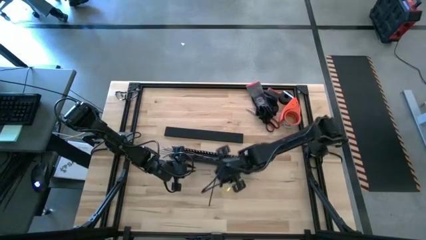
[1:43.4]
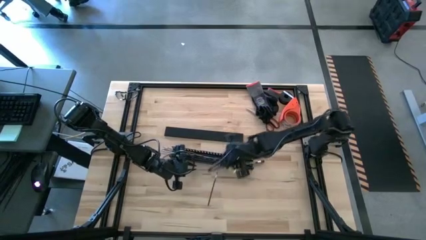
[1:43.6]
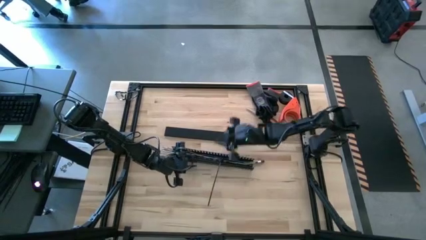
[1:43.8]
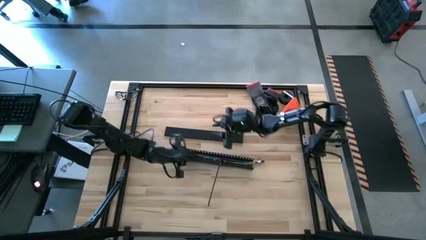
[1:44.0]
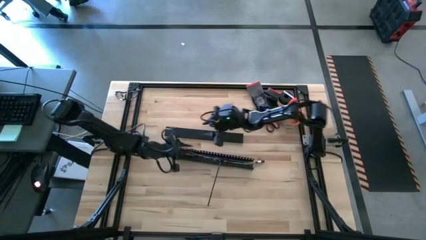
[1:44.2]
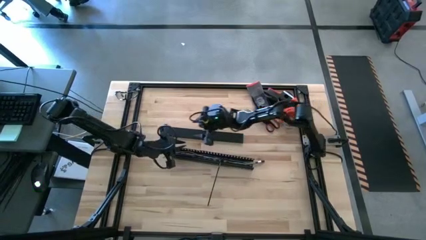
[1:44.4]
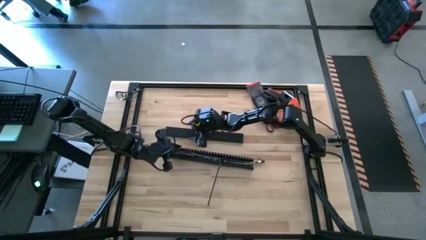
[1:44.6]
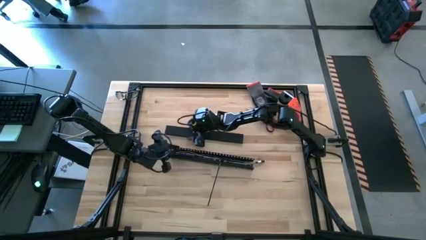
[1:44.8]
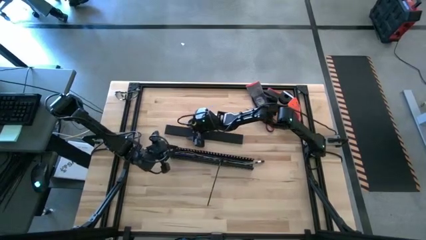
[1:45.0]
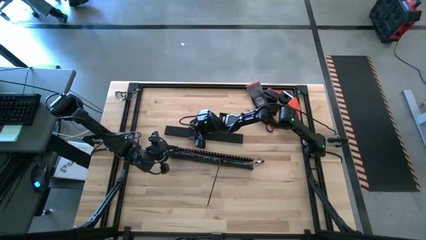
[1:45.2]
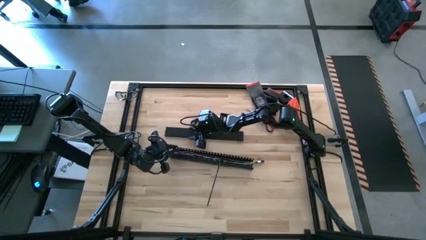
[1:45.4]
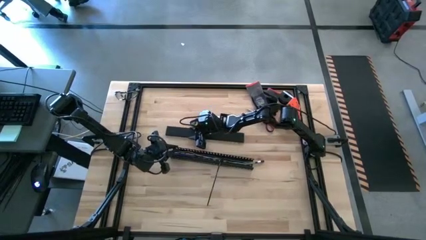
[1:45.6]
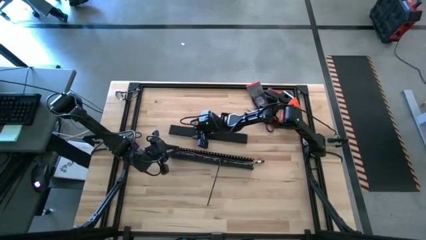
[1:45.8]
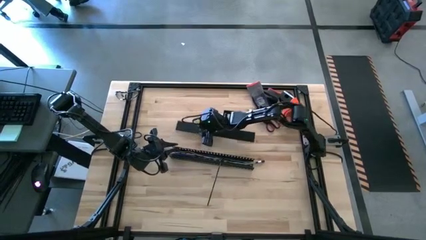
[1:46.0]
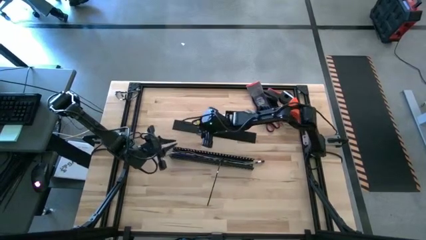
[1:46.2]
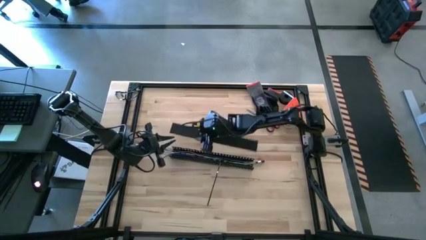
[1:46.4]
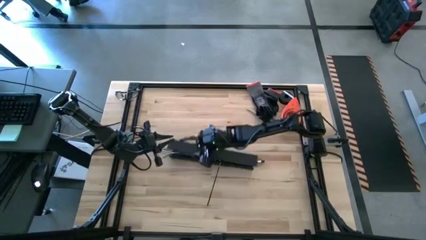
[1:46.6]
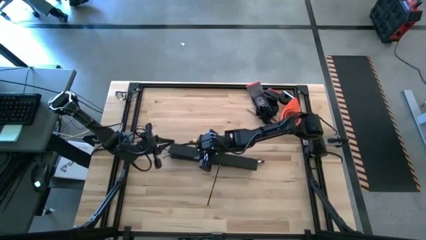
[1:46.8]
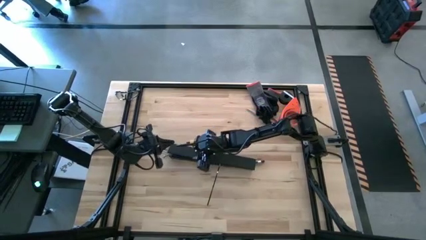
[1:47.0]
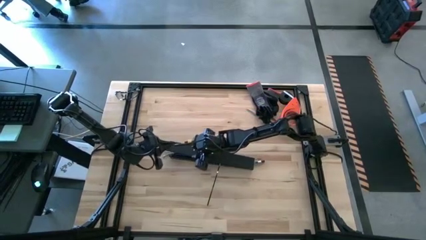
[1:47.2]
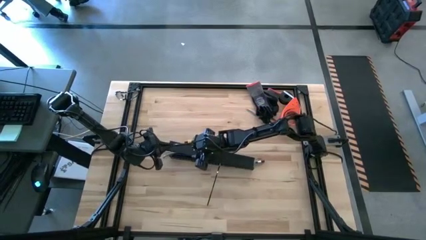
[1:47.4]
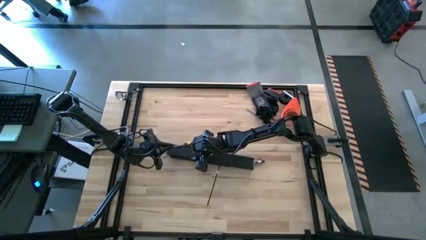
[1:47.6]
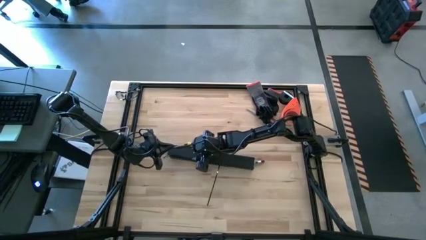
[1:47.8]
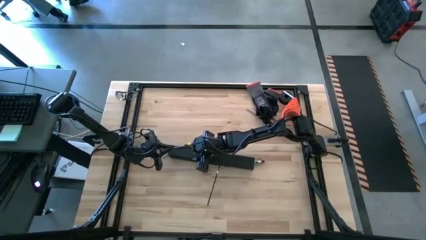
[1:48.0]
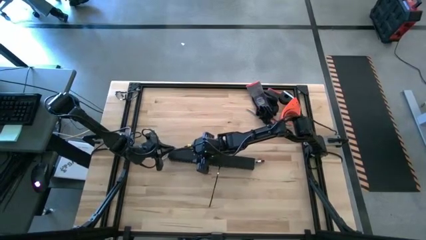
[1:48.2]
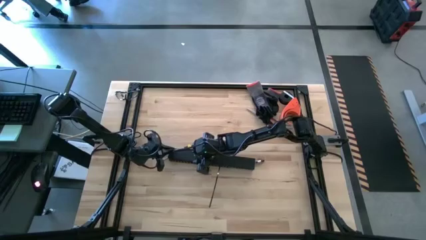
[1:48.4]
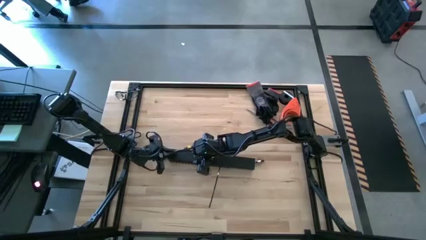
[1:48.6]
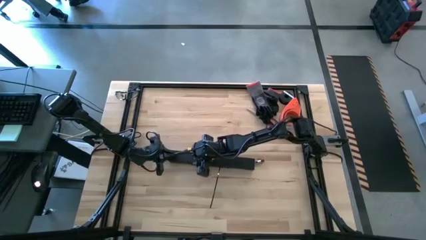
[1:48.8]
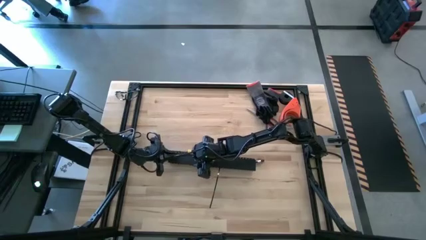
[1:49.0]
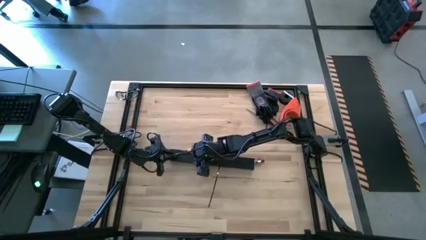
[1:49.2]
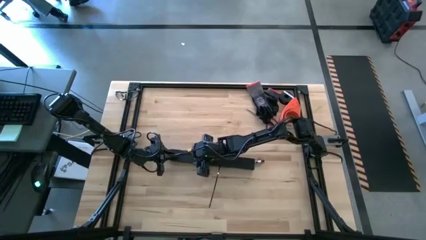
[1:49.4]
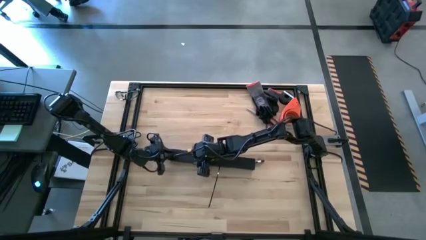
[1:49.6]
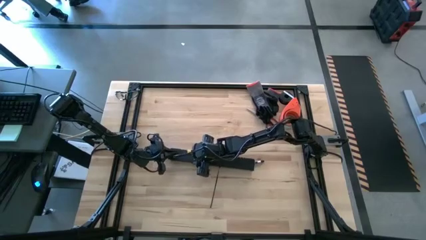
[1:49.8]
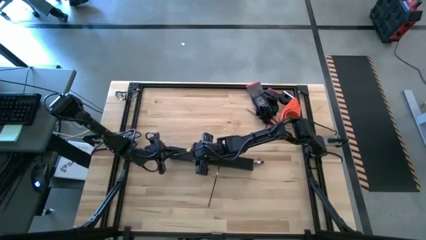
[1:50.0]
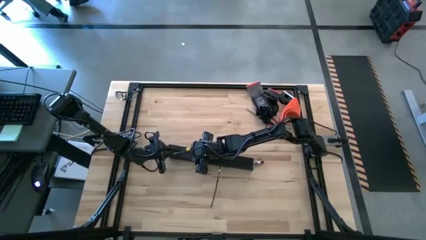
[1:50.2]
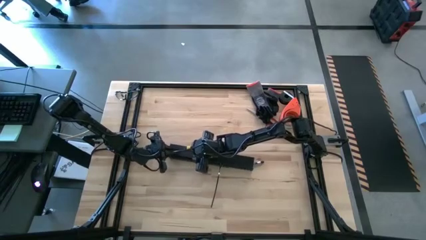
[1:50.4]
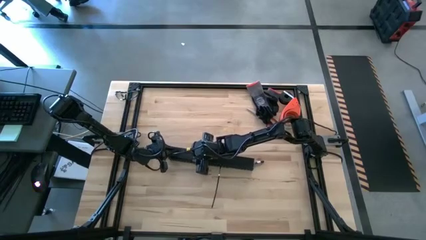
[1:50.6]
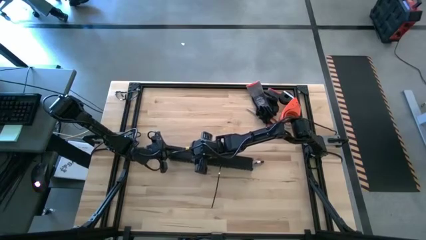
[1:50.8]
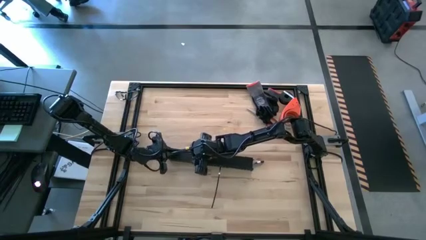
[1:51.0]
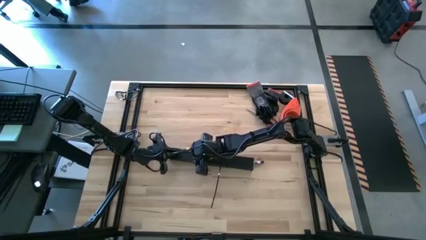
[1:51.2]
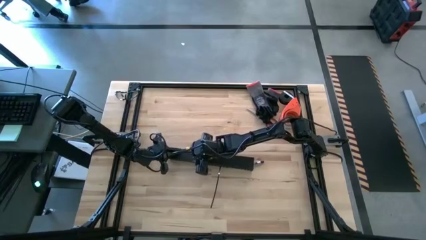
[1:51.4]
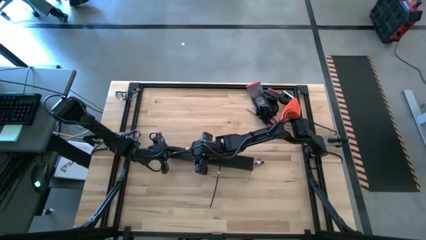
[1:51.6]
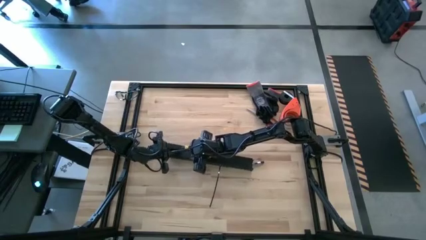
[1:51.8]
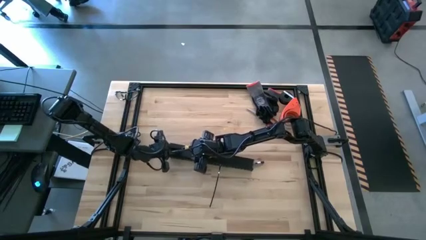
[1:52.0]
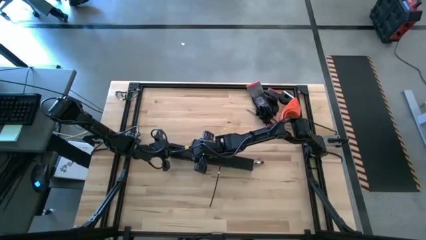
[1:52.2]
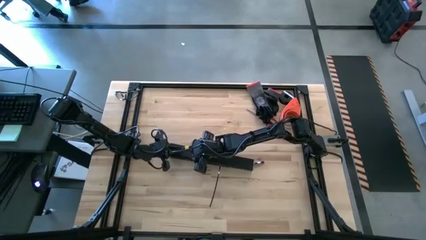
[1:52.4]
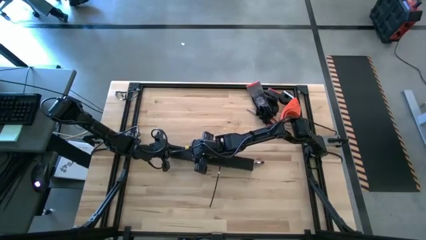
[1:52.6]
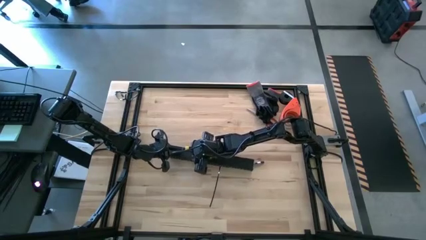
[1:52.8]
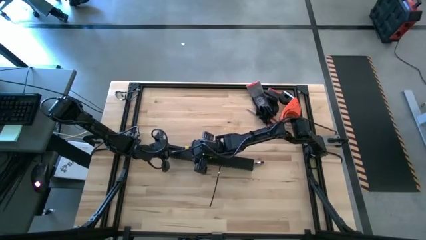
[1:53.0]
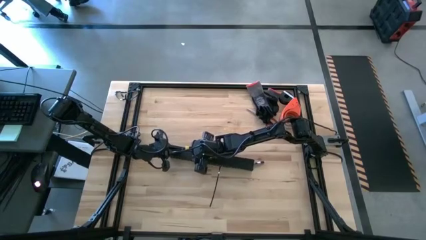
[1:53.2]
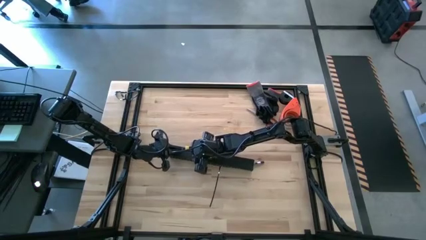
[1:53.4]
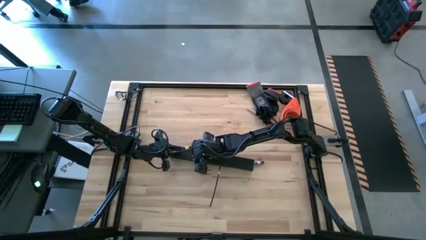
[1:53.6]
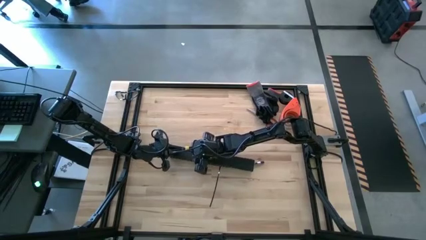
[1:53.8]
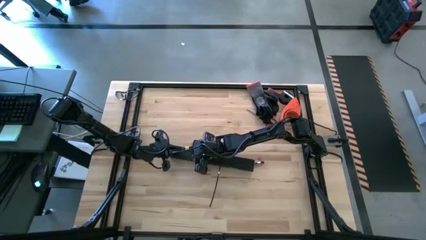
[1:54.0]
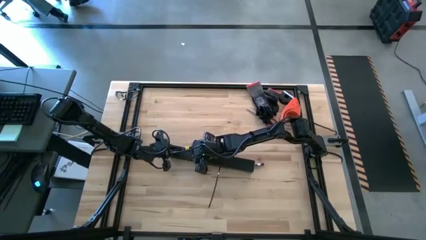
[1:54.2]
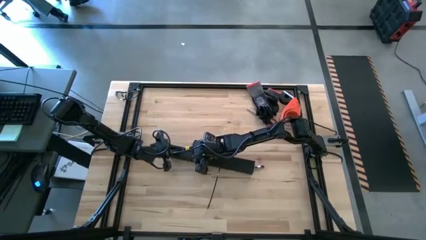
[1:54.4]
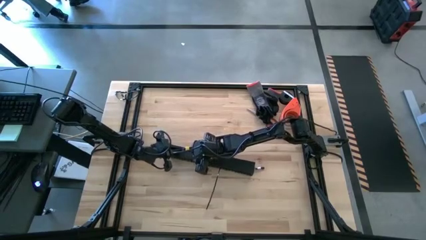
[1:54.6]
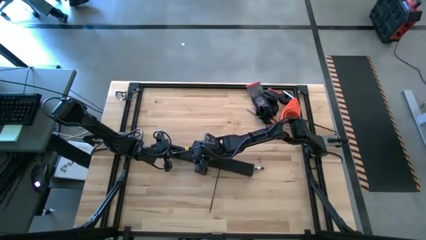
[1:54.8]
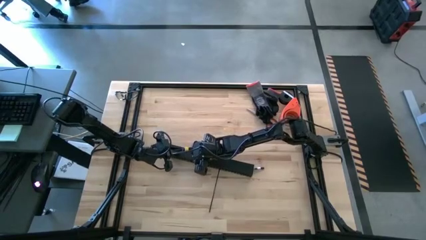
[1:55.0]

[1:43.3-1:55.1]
Task: Ziptie cables
Close the cable duct cover

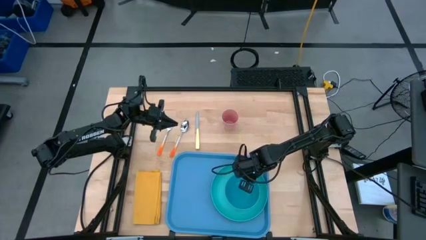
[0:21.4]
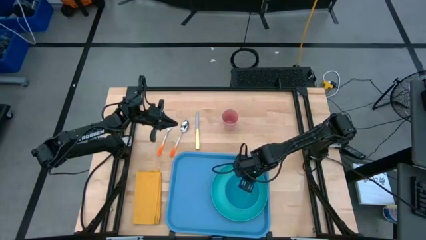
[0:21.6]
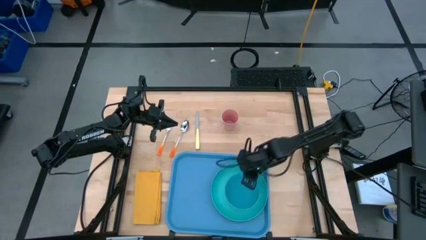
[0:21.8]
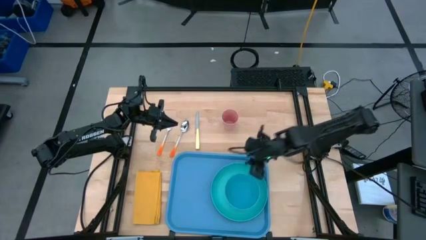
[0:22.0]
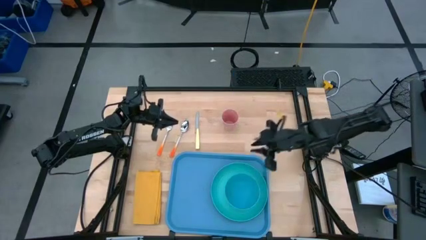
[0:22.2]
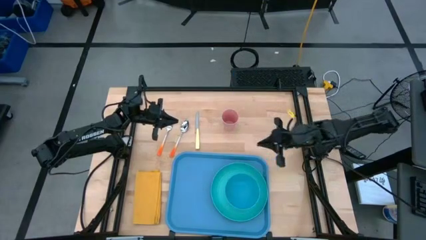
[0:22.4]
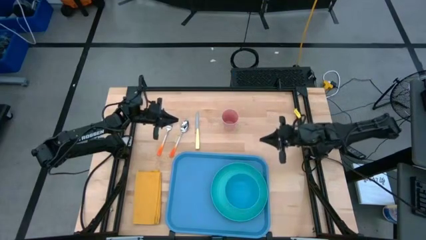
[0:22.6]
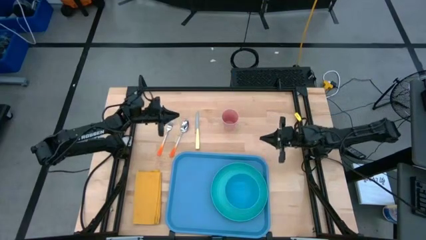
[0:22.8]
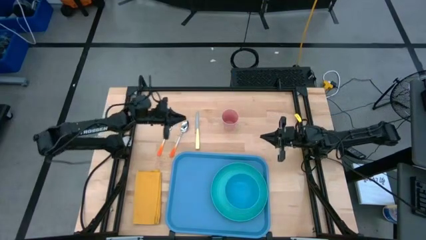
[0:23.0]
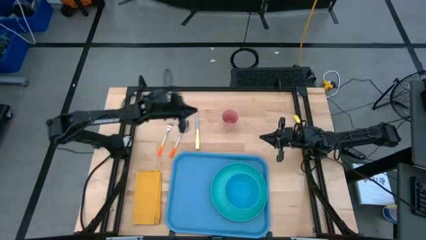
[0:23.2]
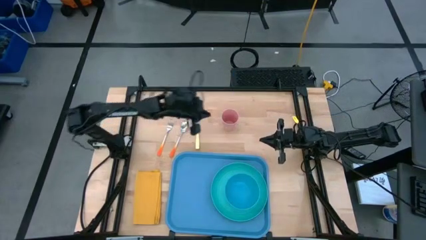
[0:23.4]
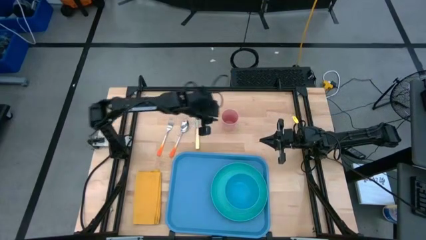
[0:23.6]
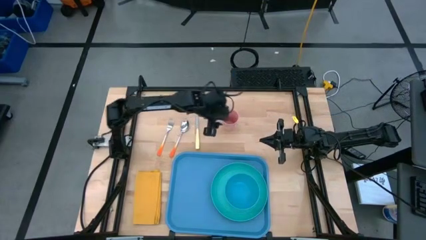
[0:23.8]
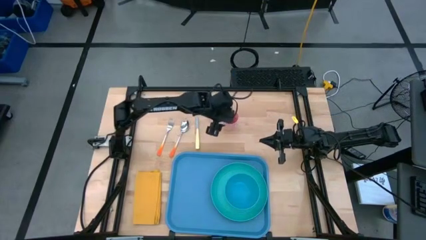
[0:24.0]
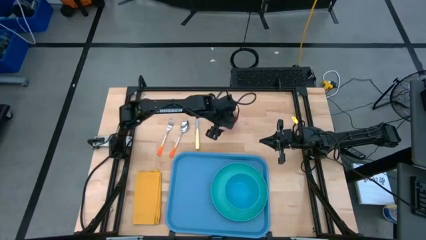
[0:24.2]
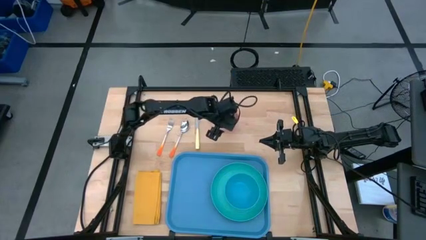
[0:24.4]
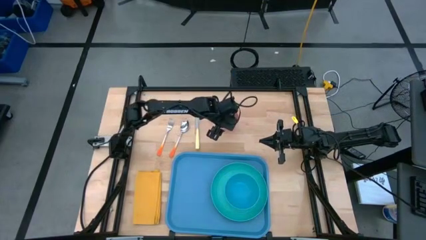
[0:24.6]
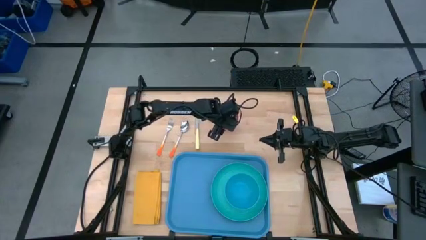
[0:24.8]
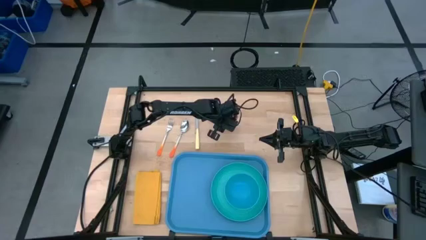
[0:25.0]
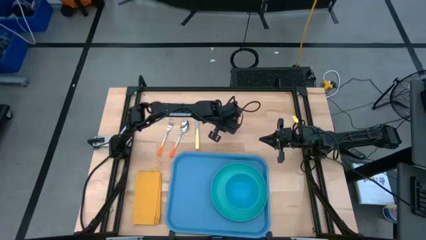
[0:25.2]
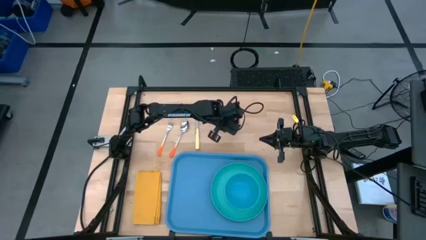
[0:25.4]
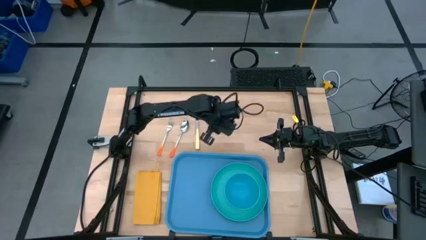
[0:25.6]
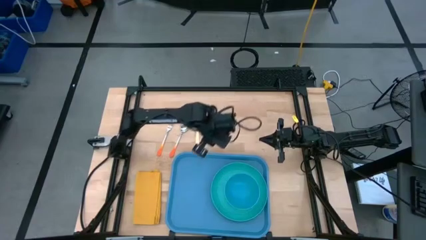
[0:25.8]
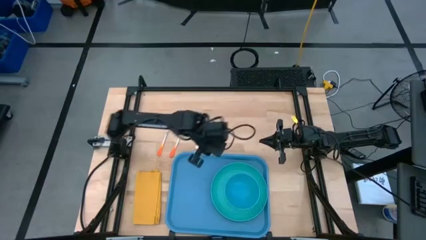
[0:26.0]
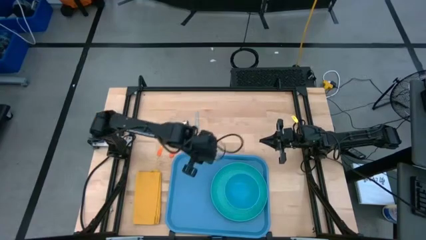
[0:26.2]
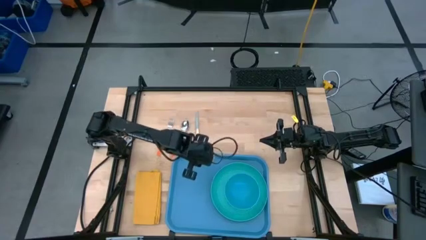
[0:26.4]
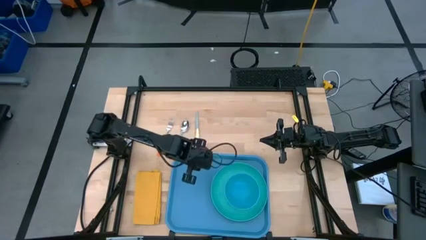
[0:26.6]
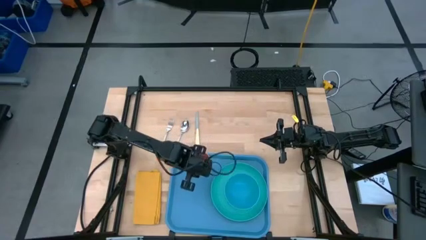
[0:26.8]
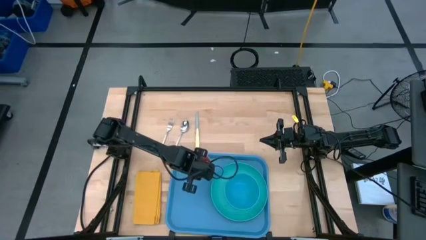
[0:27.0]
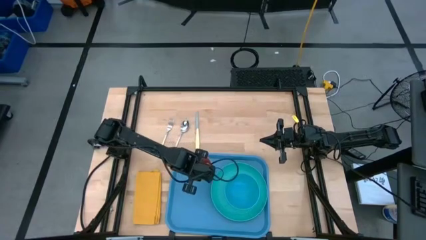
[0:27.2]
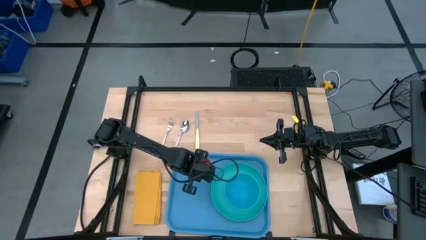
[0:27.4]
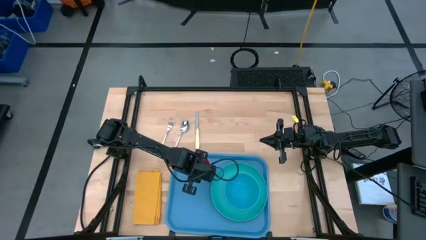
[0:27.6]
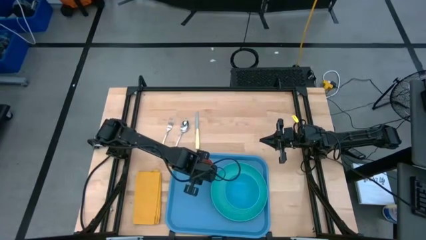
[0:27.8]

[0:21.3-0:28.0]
Task: Set up tray
Put the pink cup on top of the green plate on the blue serving tray
